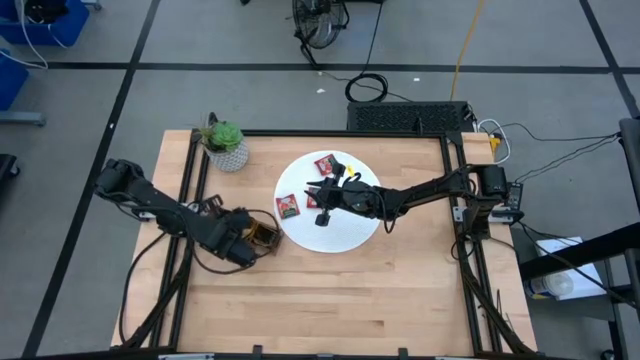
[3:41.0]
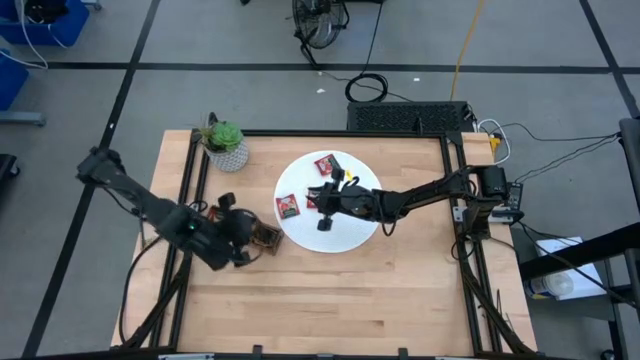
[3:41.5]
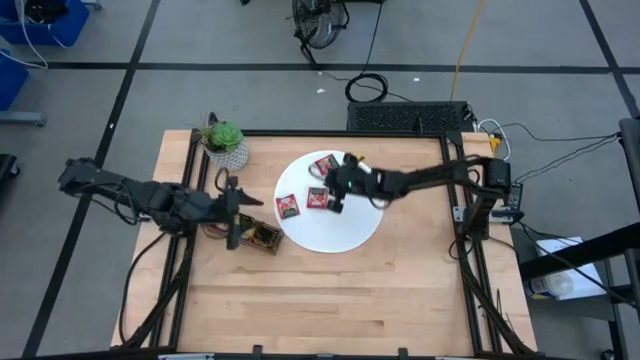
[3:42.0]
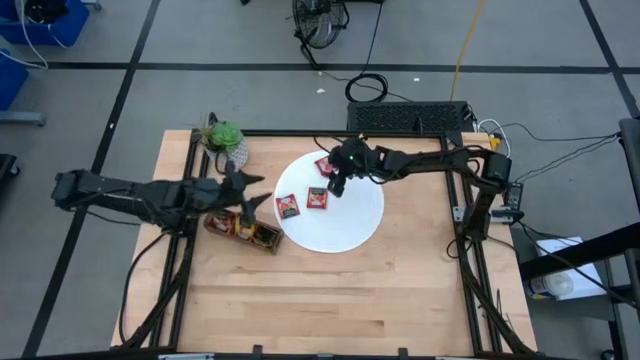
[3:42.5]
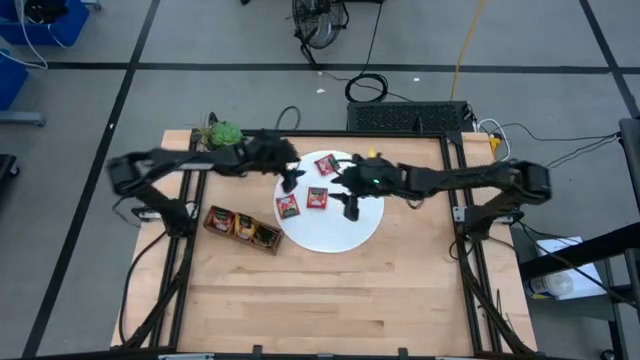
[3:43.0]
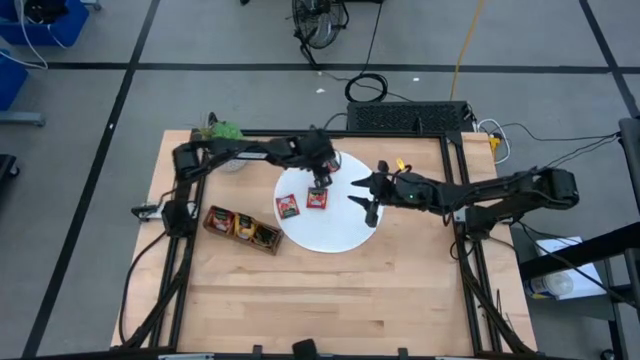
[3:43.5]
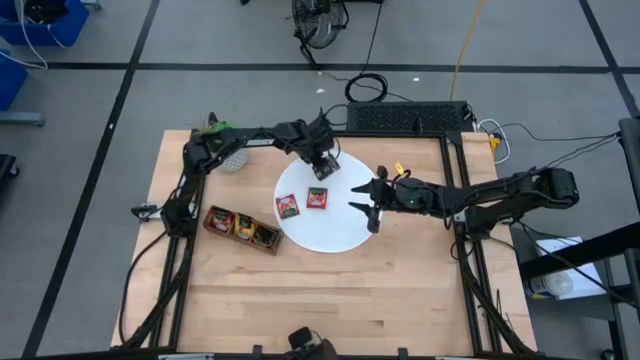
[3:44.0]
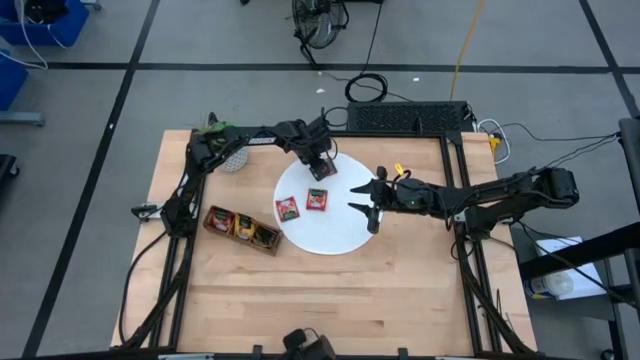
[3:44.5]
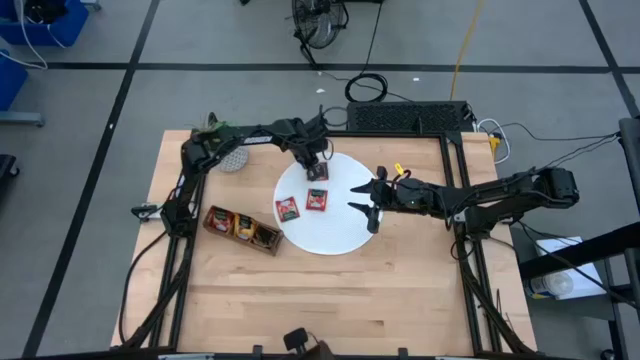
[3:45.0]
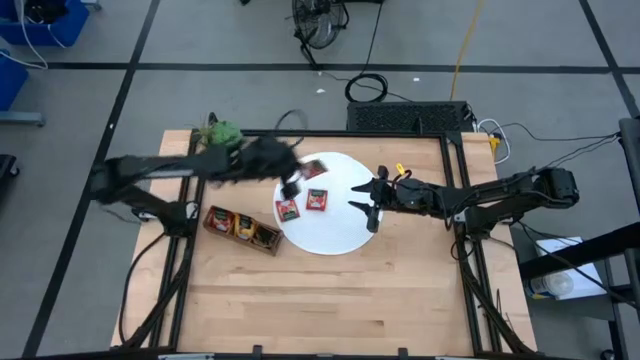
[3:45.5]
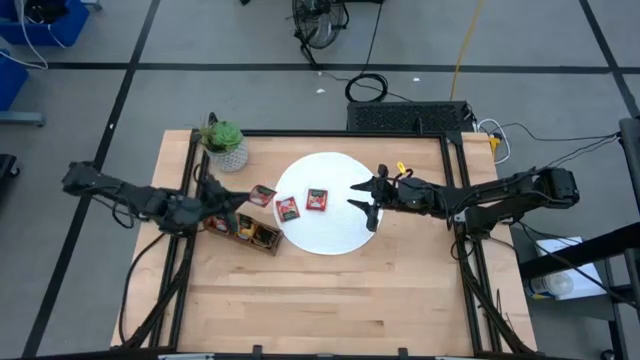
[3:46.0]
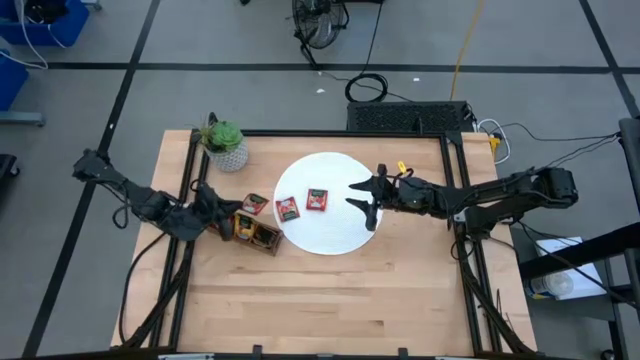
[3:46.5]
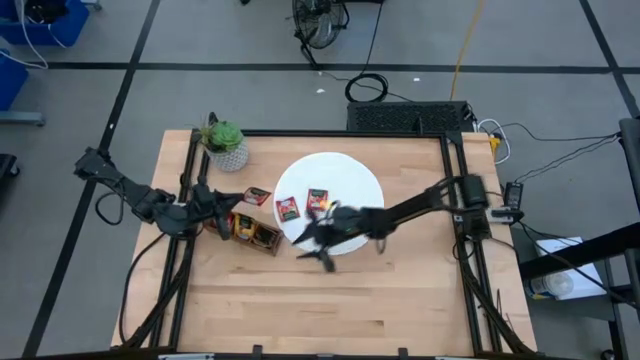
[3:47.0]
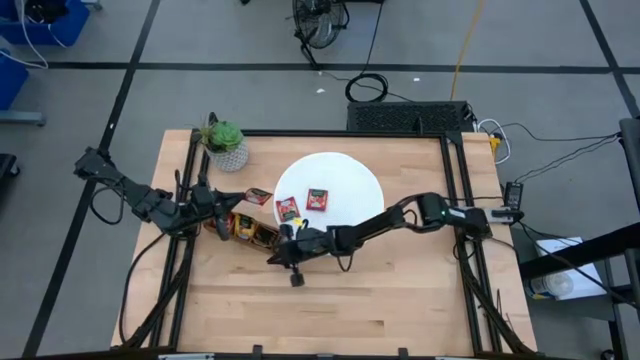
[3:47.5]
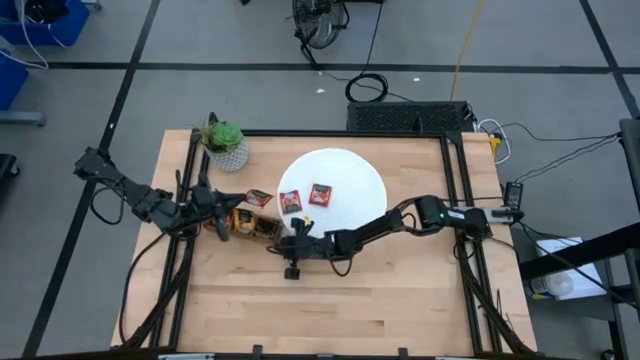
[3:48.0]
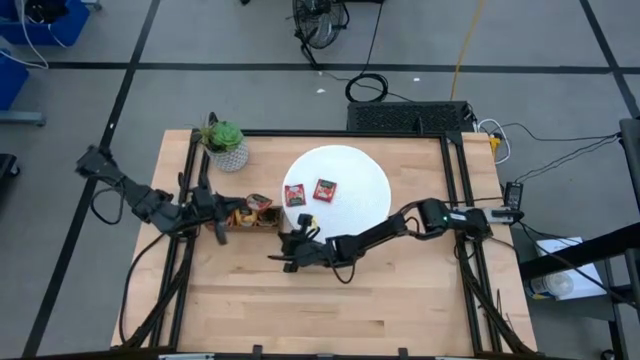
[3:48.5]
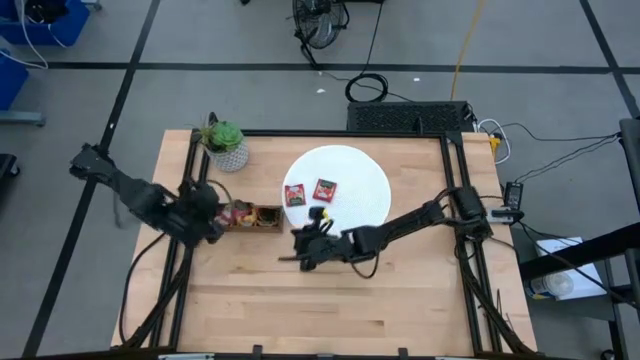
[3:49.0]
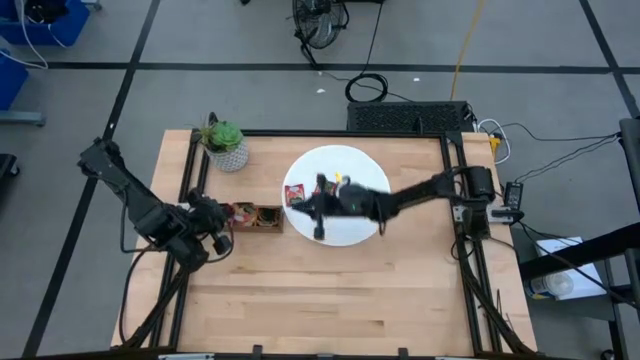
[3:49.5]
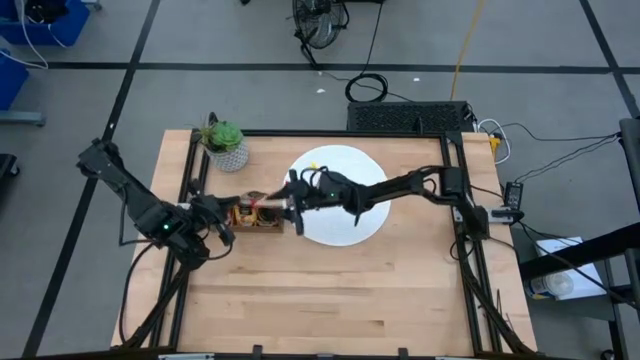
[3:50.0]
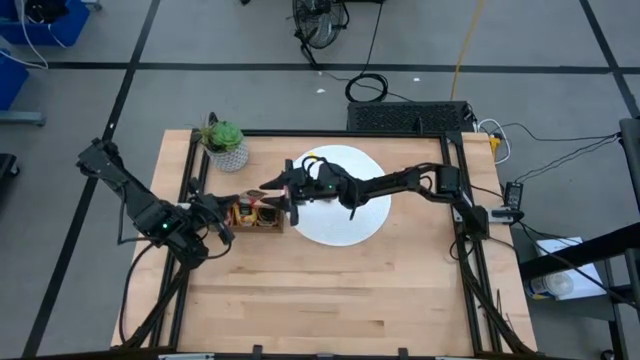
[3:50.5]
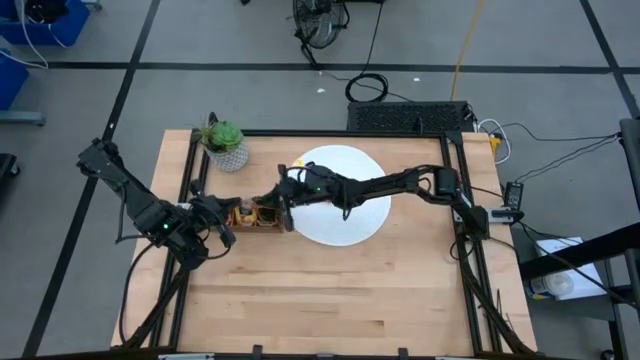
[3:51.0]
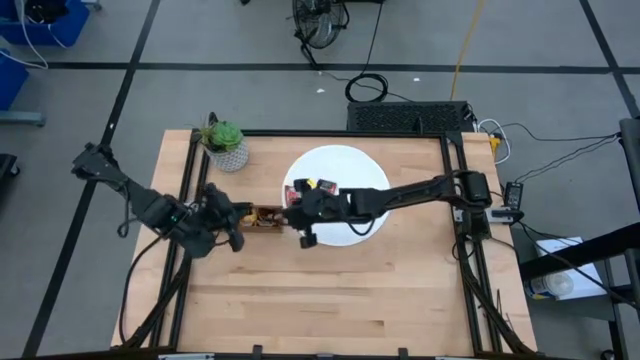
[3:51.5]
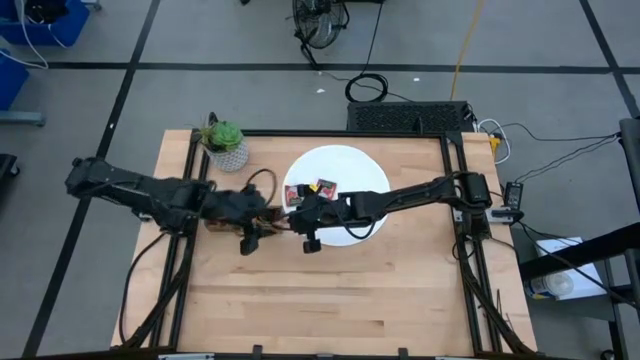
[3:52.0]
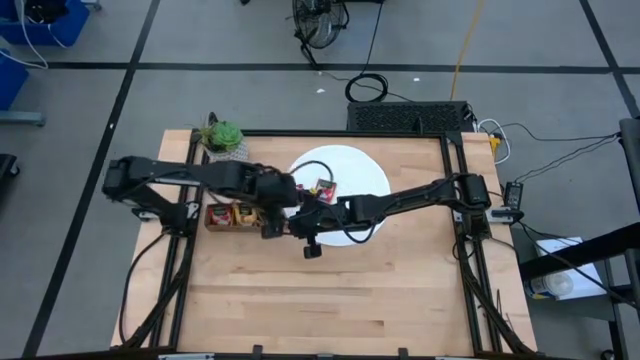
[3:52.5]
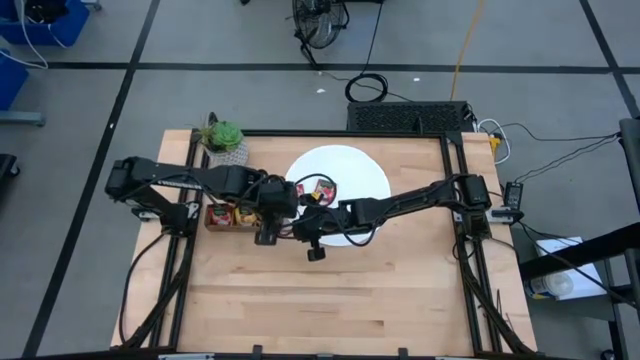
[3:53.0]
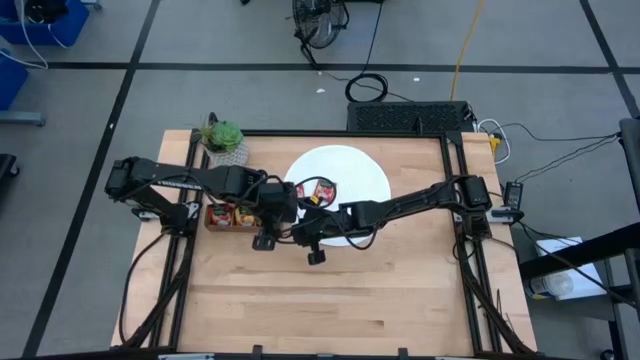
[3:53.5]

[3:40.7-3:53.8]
Task: Pick & Place Tea
Put the red tea bag into the left section of the wooden organizer

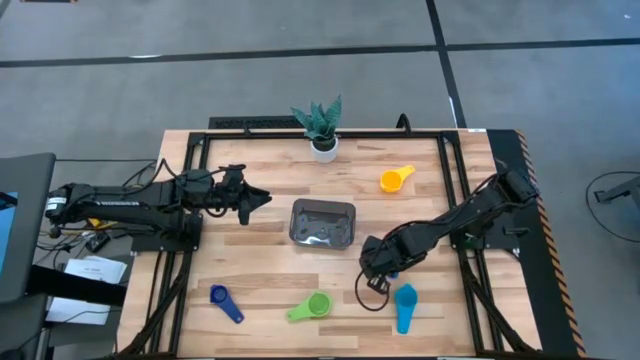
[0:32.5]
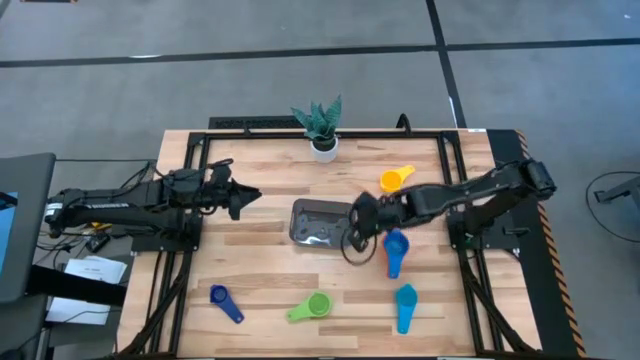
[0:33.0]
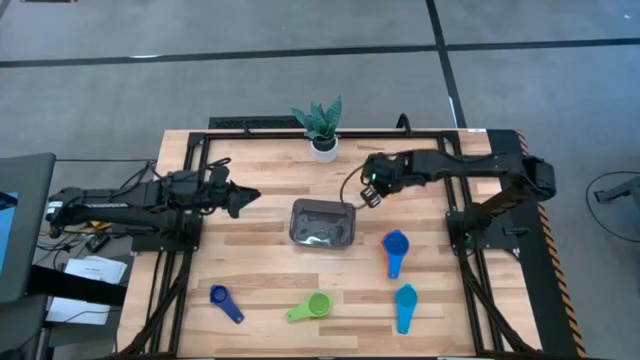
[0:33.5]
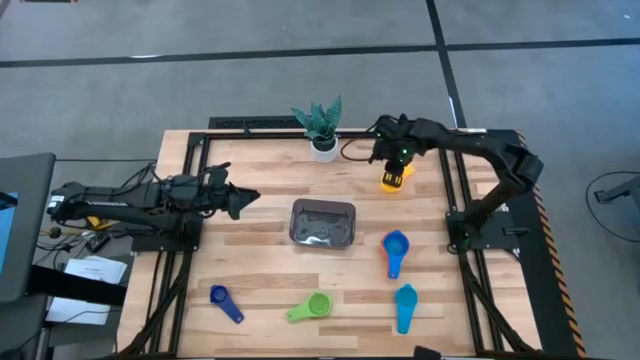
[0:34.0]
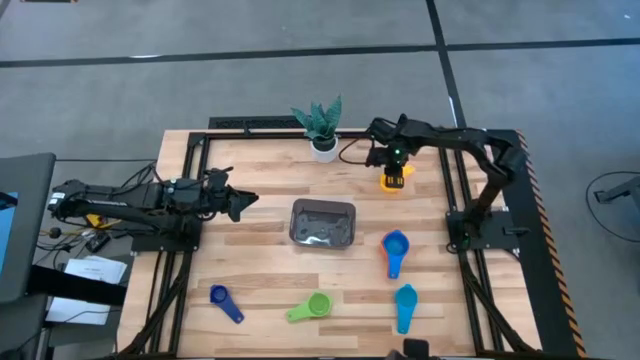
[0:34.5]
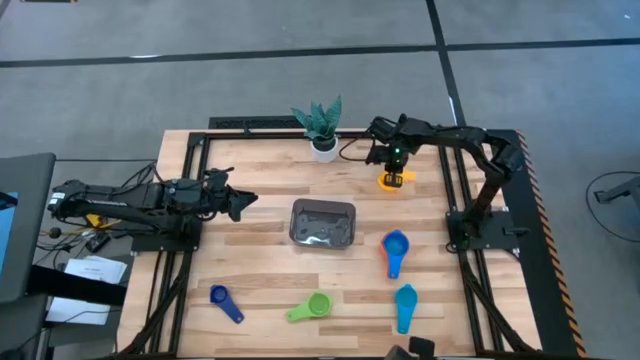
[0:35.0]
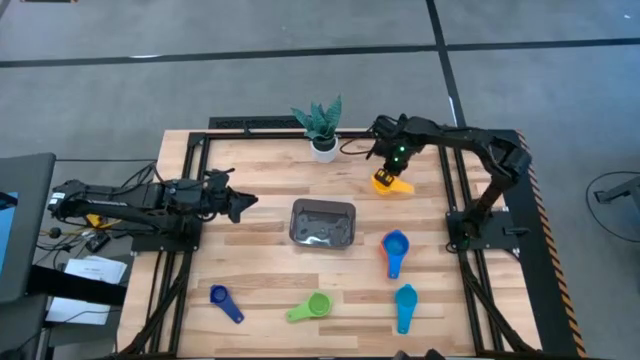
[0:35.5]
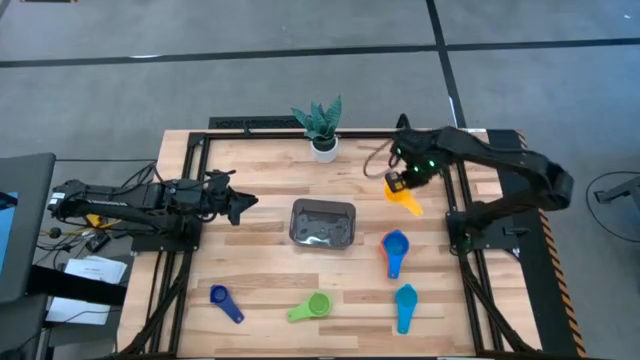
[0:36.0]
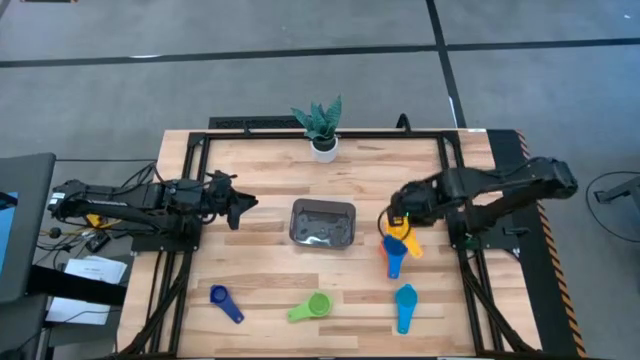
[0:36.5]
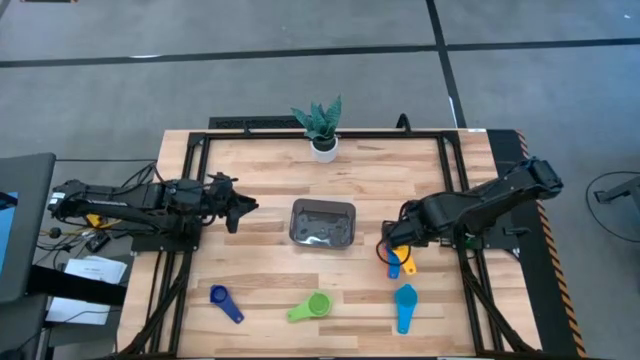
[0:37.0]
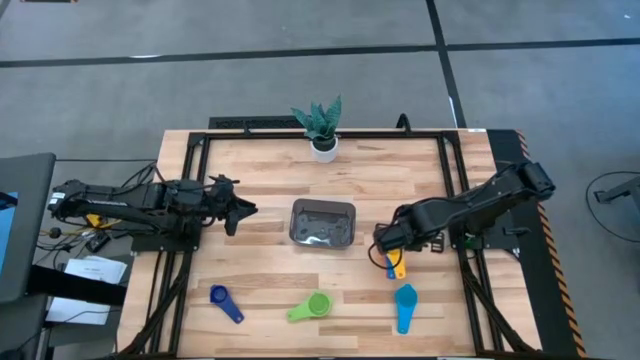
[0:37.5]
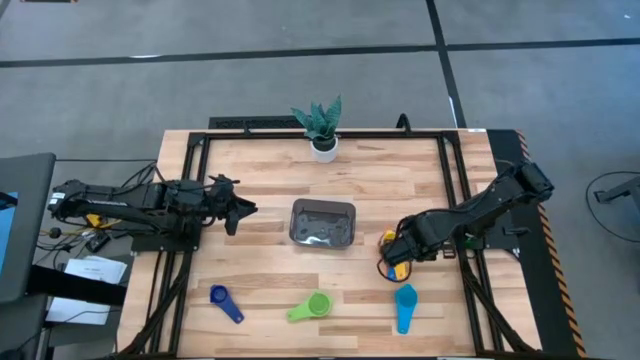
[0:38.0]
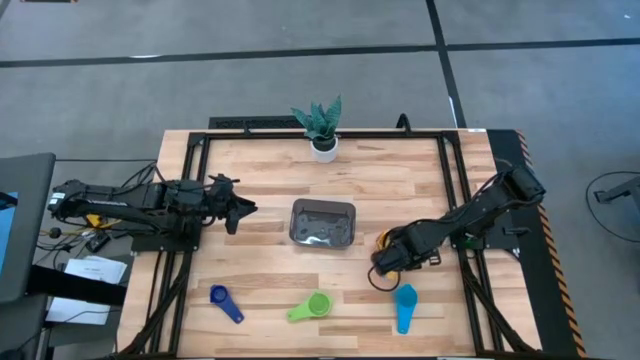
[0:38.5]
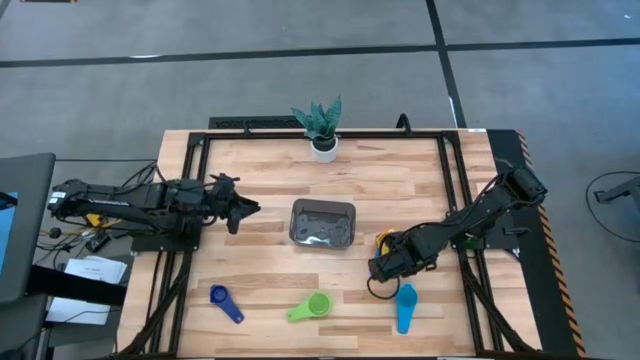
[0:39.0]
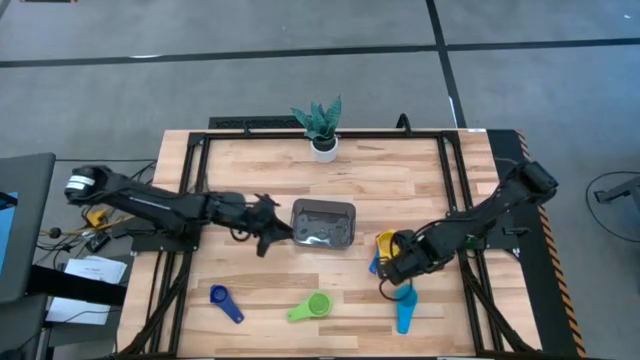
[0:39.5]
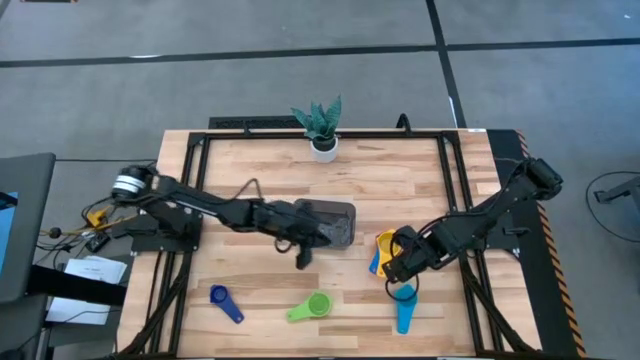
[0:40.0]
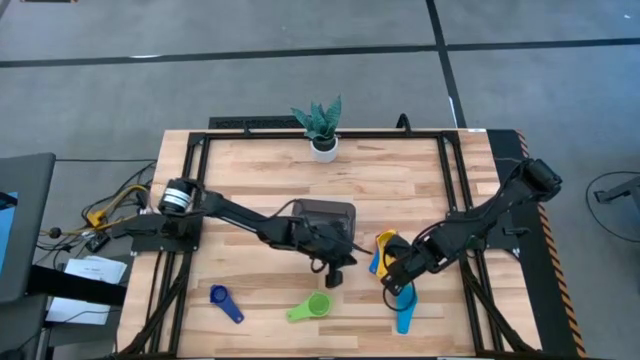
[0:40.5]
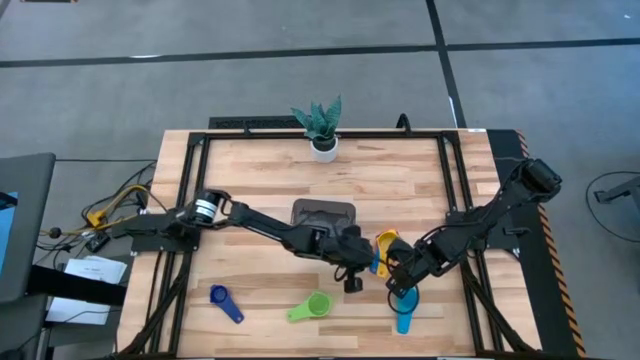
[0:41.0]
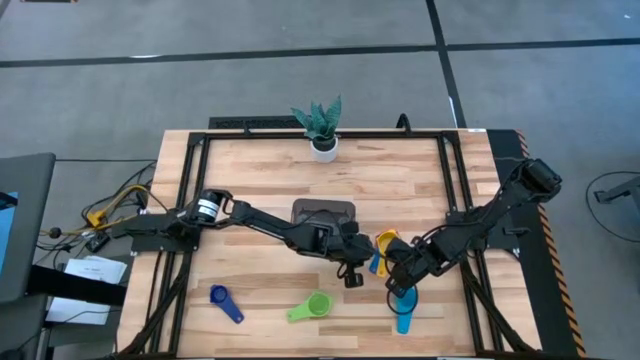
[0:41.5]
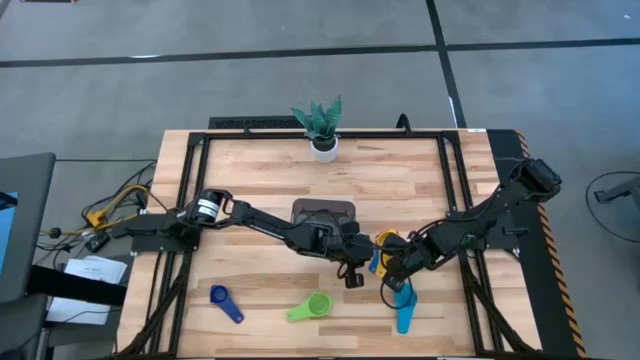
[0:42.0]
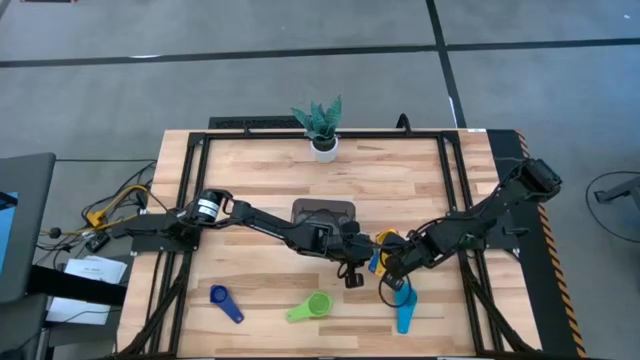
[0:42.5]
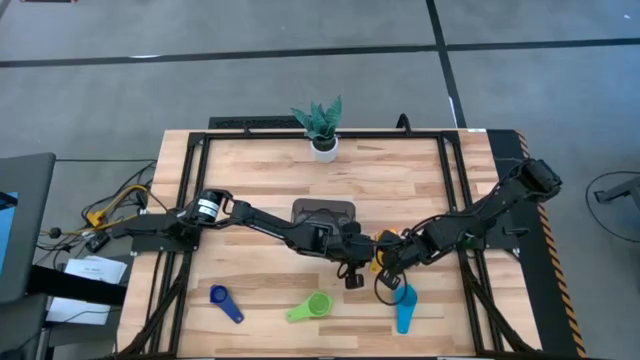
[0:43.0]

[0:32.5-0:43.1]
Task: Nest measuring cups in basket
Stack the yellow measuring cup on top of the blue measuring cup
